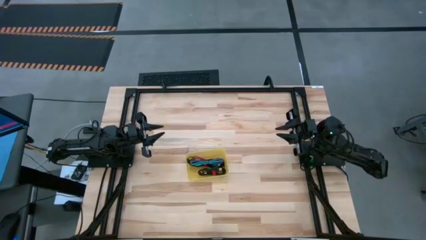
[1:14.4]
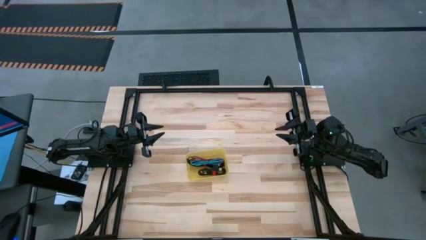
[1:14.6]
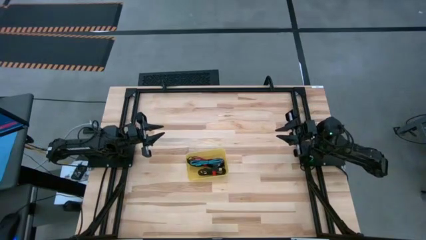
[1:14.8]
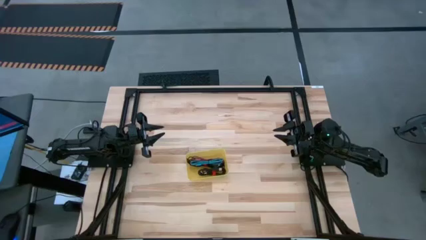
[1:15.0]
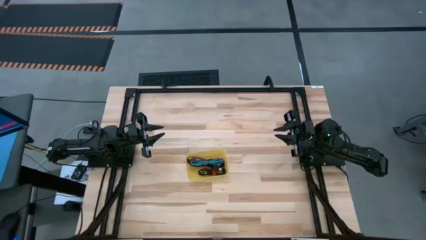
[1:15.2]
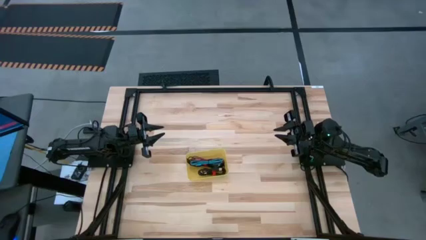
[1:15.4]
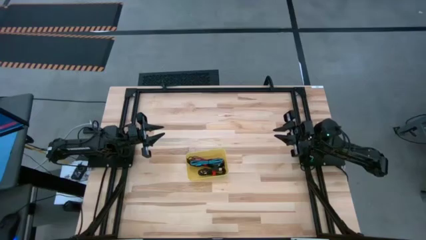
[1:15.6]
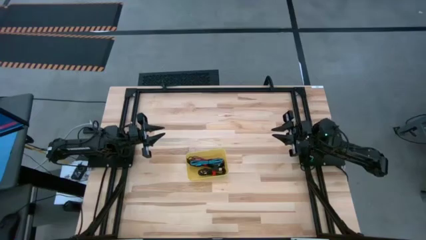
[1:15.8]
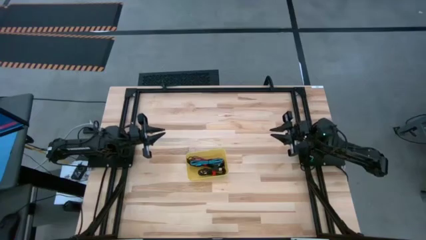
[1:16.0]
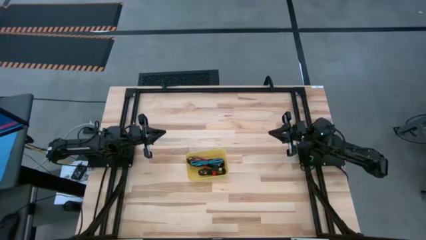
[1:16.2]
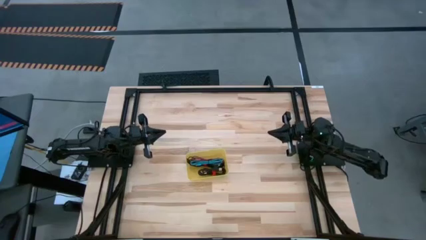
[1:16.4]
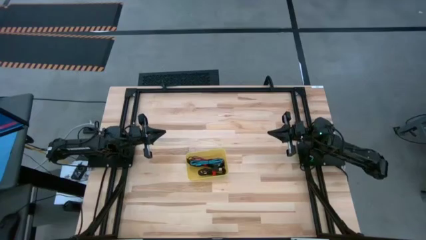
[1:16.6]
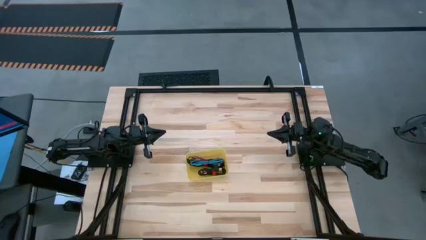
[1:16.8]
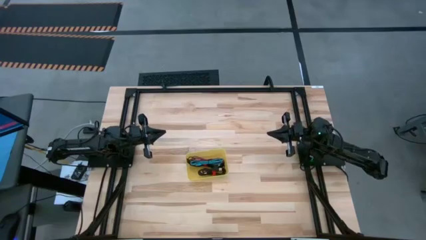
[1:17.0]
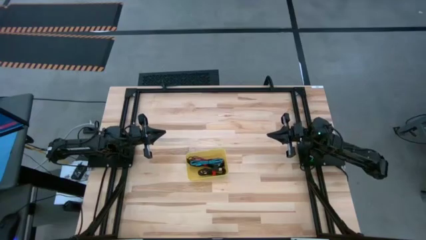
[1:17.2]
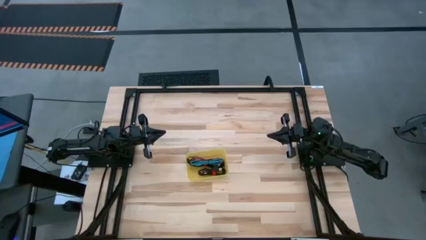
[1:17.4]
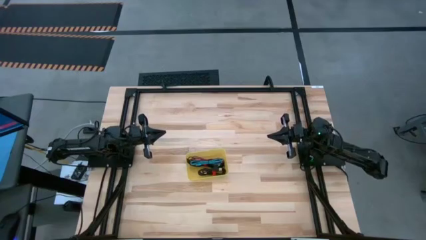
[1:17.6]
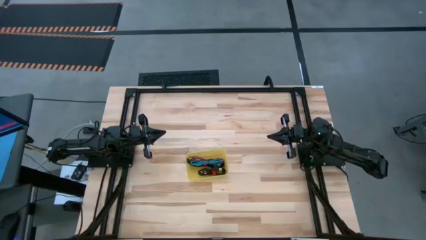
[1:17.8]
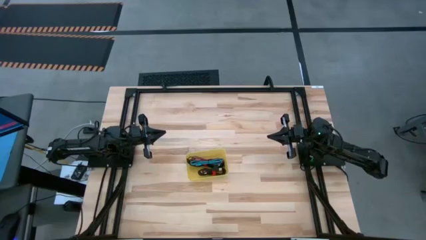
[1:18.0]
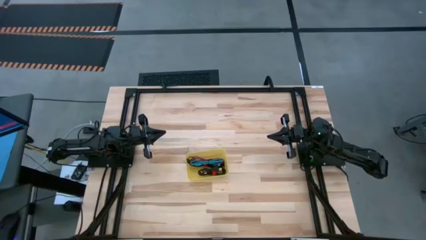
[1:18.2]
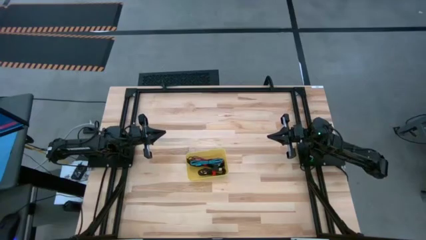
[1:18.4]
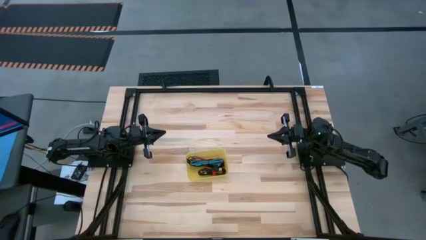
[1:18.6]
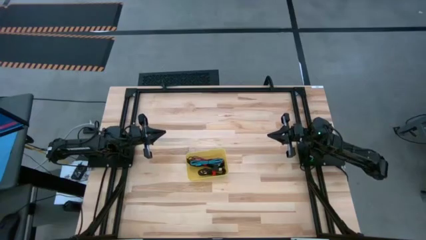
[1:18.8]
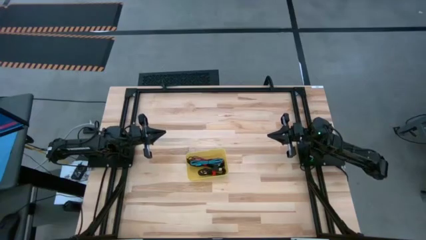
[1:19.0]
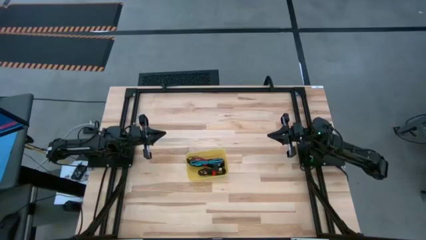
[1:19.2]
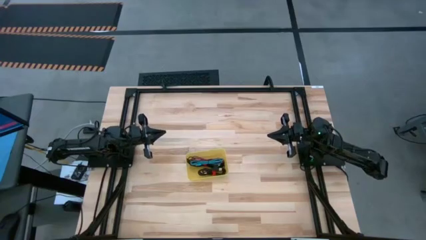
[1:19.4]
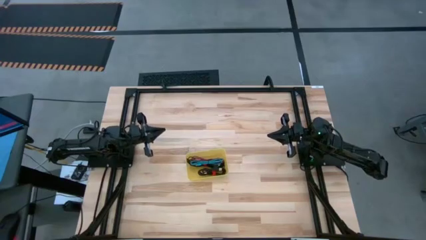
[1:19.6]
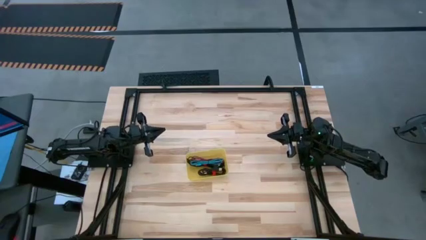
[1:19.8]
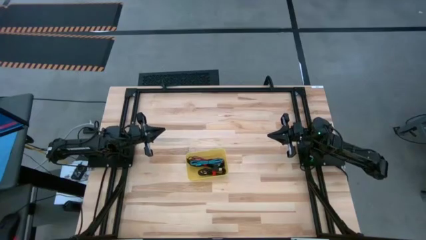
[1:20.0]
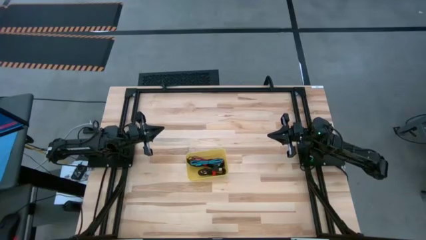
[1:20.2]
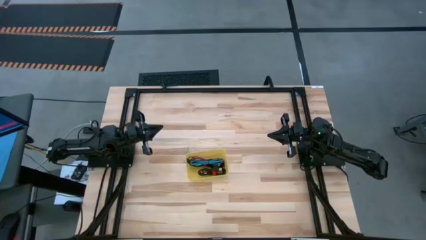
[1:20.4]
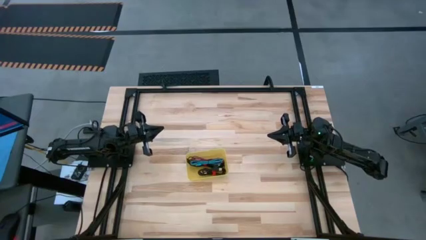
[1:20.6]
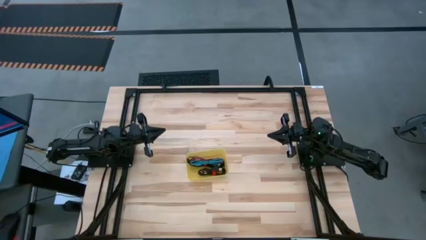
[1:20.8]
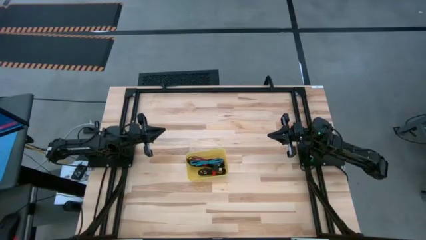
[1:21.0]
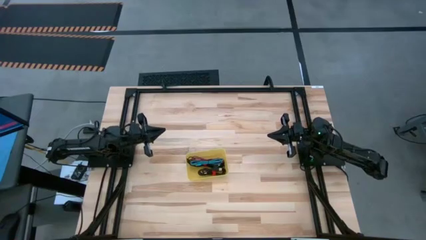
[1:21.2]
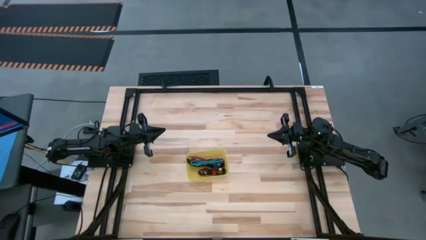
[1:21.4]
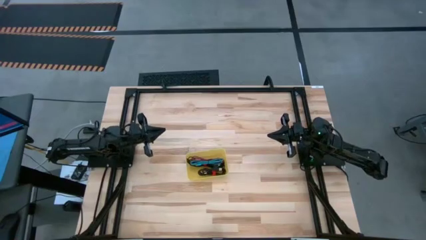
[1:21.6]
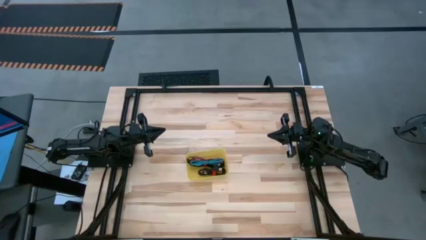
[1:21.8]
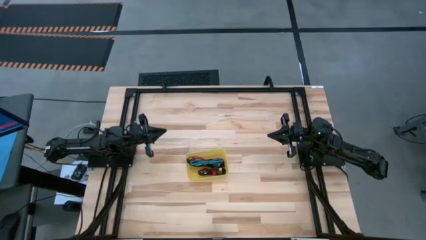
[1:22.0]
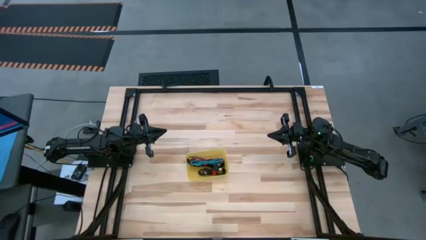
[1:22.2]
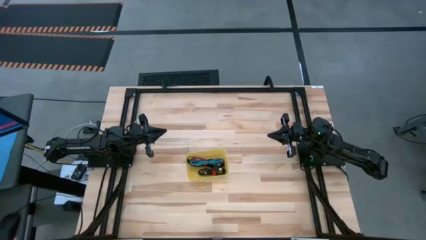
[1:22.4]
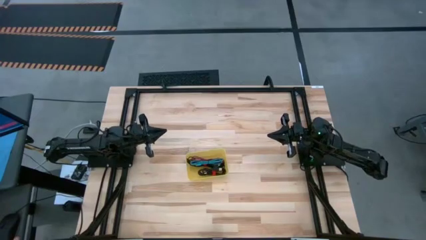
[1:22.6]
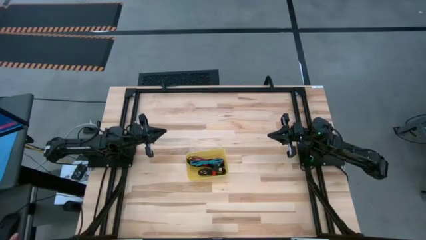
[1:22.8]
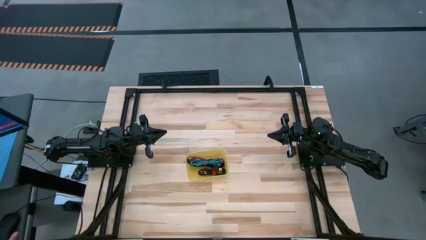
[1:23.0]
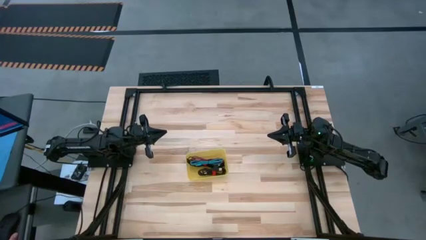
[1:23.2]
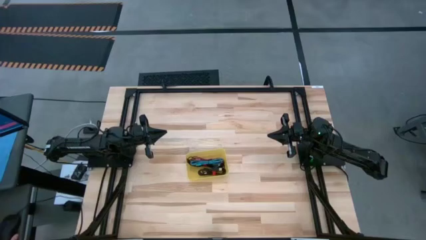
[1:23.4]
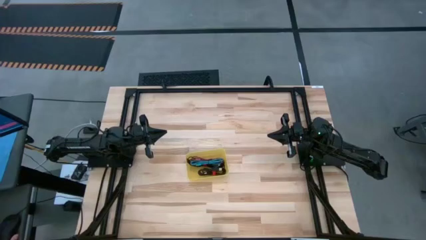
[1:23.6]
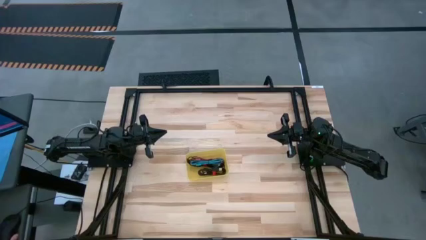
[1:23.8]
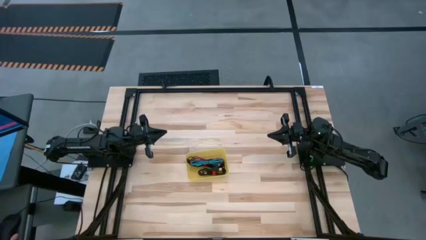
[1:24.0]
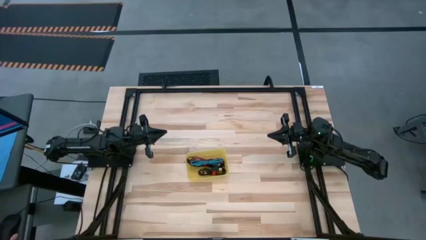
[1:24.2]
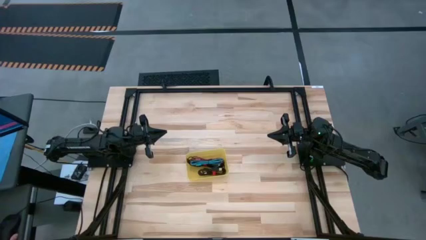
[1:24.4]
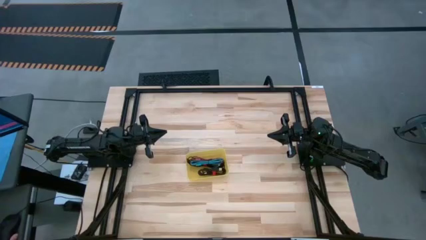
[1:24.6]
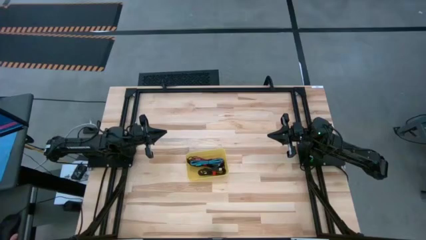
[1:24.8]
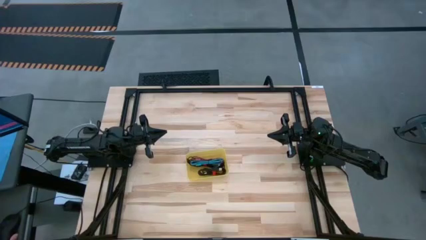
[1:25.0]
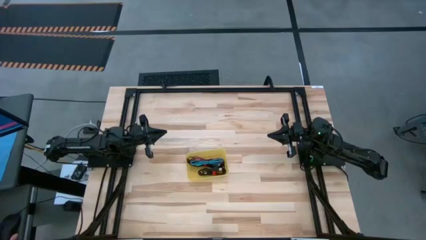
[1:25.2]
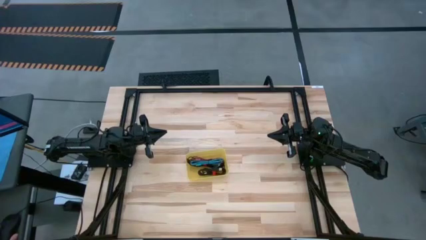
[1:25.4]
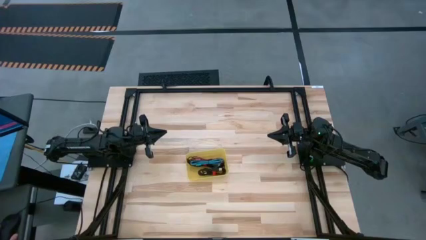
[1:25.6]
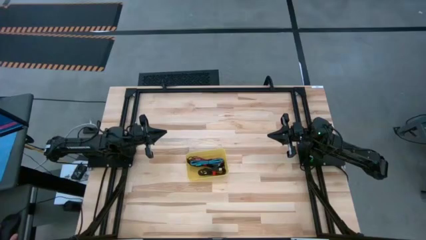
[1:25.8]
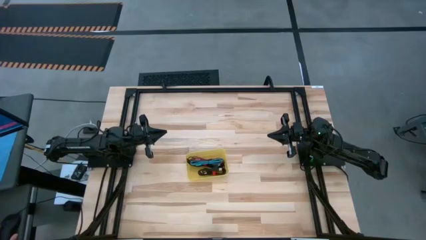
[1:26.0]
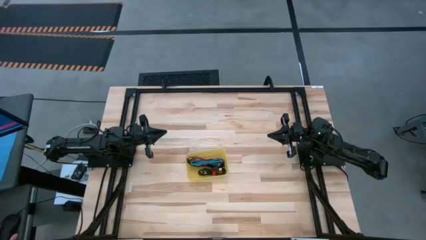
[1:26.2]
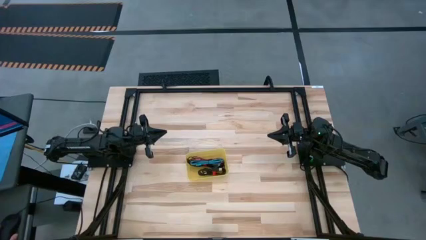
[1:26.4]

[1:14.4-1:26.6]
Task: Pick and place USB-C Cables
Return to Home Position
